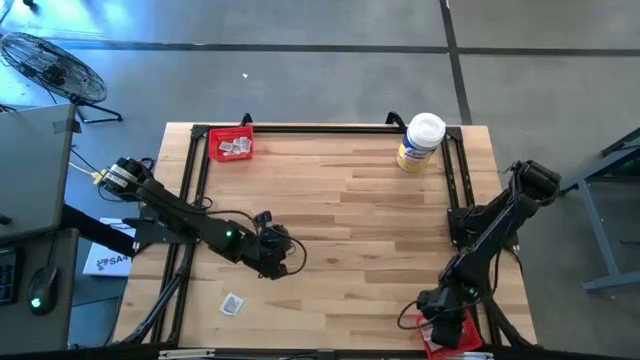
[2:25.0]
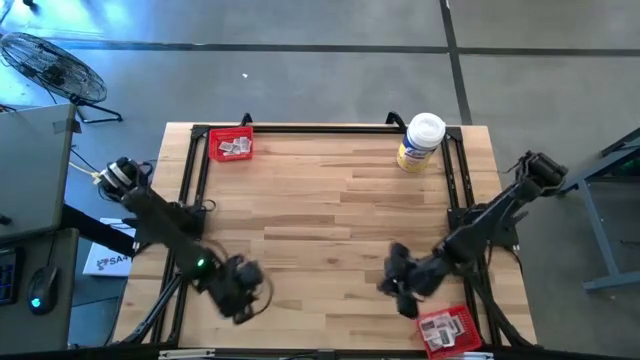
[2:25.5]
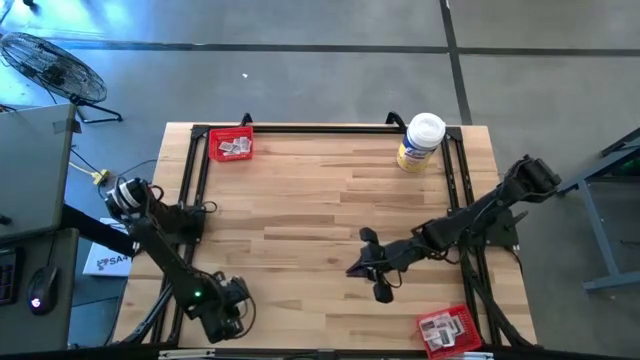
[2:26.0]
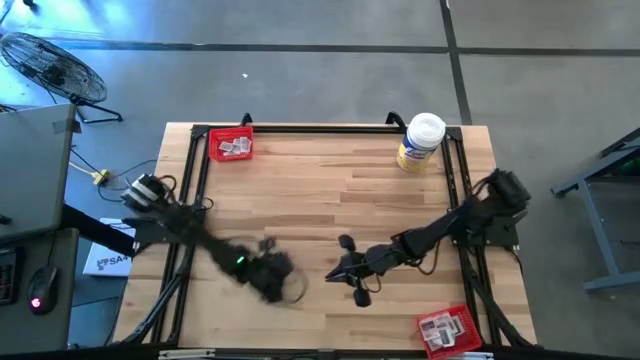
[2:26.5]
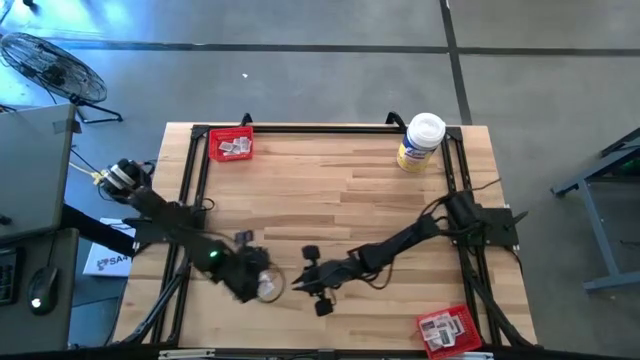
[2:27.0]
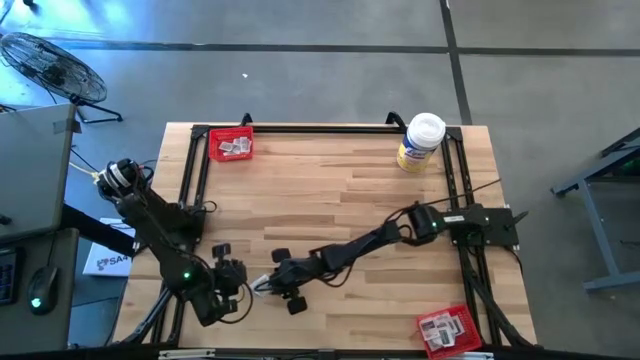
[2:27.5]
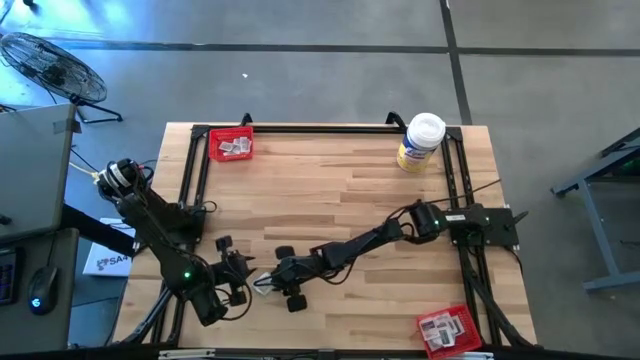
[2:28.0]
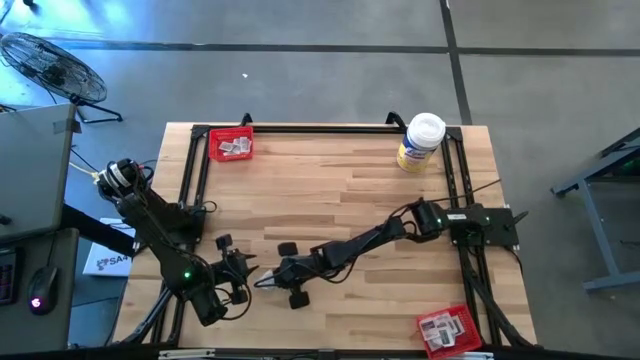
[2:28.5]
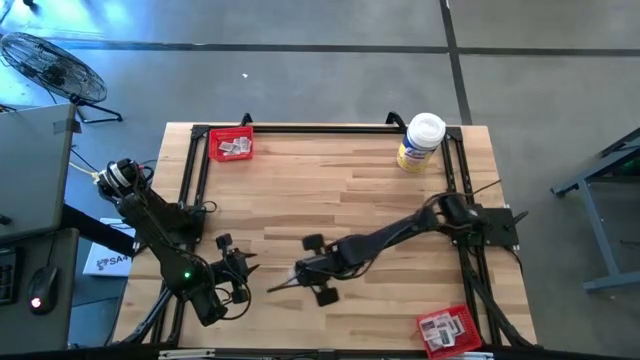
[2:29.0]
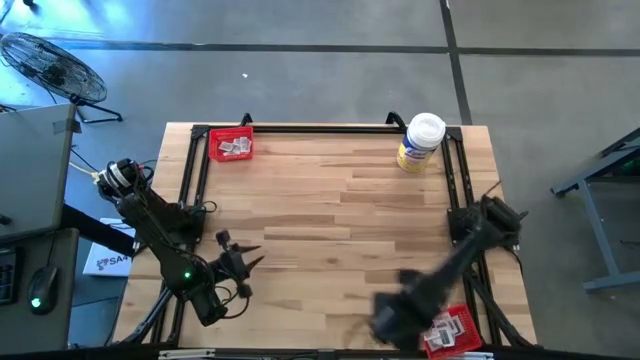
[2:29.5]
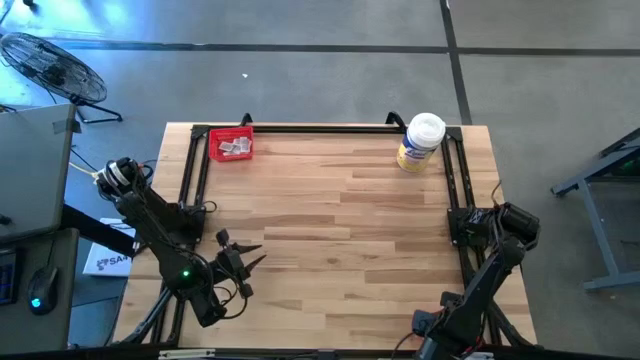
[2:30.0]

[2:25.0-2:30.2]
Task: Pick & Place First Aid Supplies
Put the white and gray towelette pack into the bottom red bin

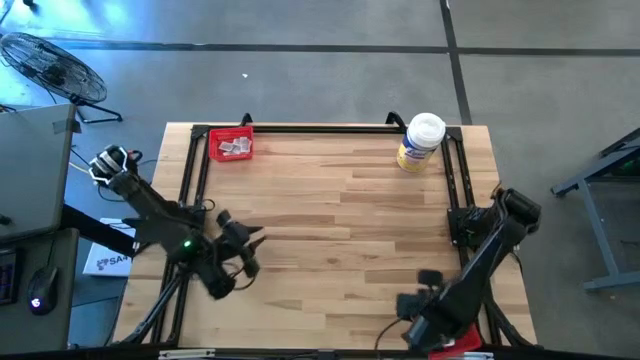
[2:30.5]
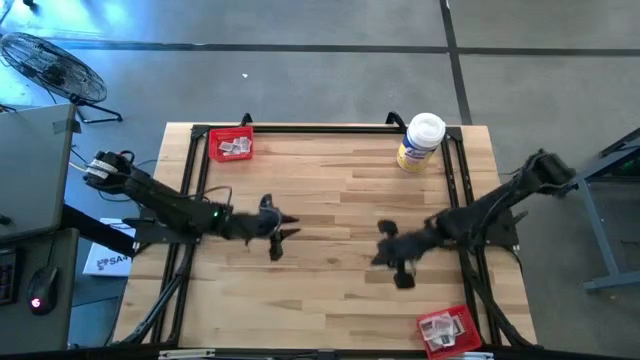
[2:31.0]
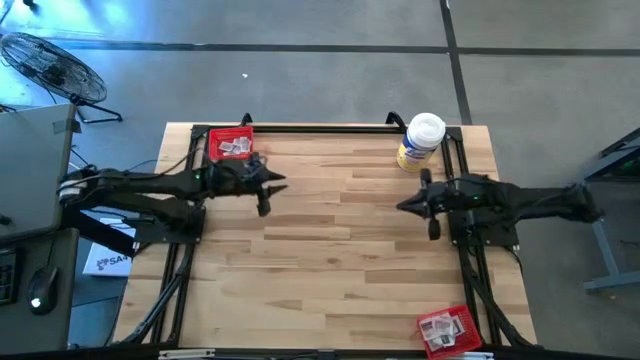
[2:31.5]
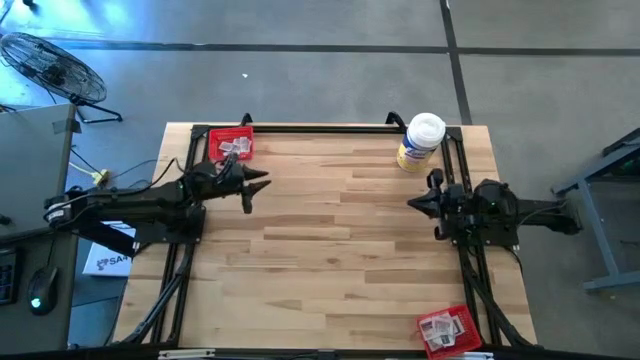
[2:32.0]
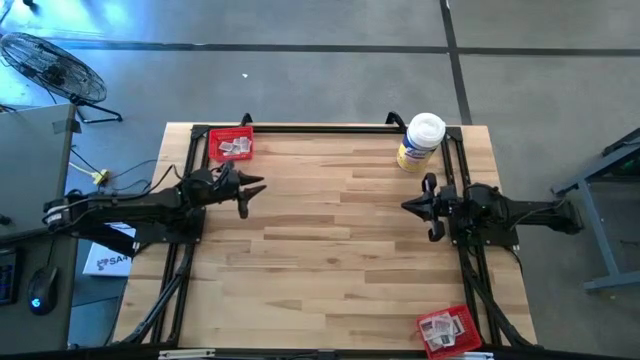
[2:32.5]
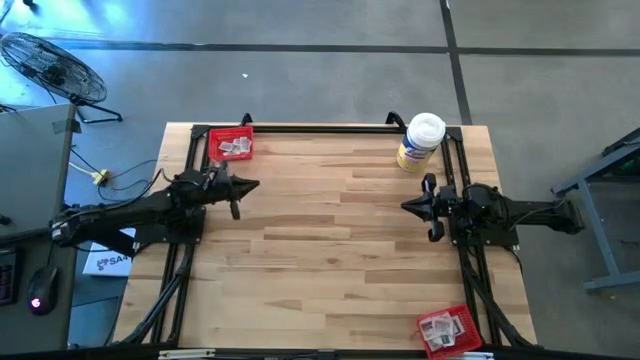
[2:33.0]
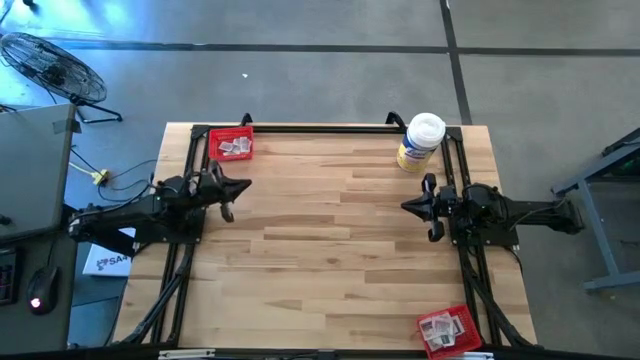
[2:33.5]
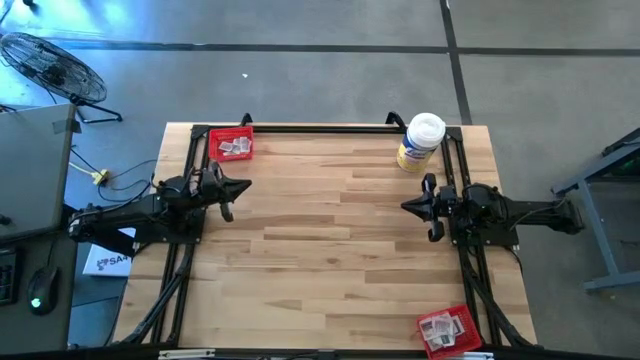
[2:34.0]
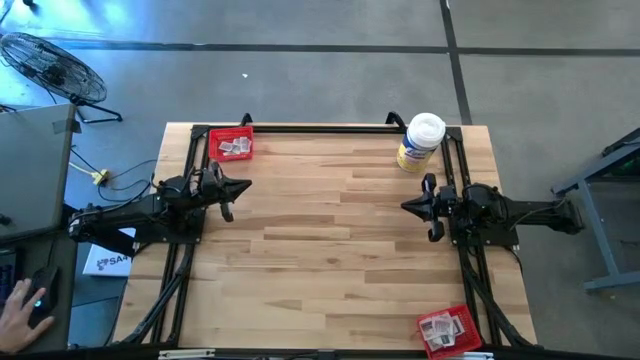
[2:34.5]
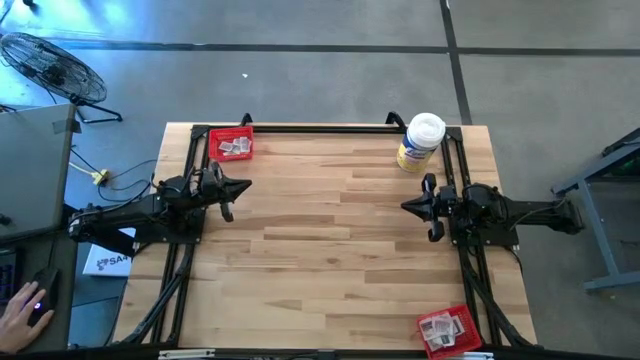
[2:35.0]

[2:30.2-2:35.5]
Return to Home Position

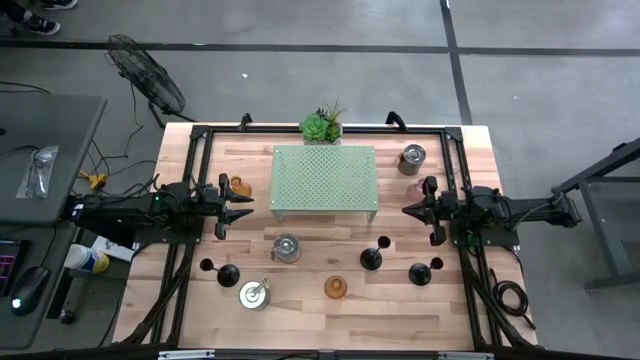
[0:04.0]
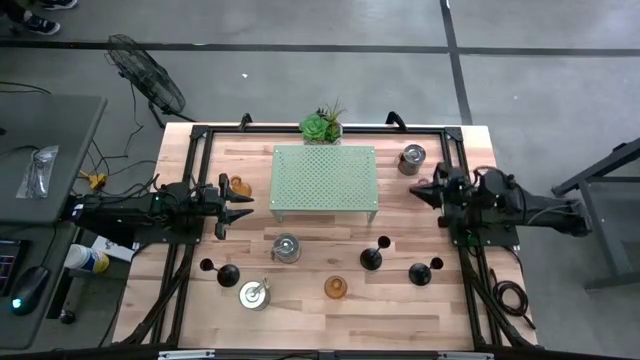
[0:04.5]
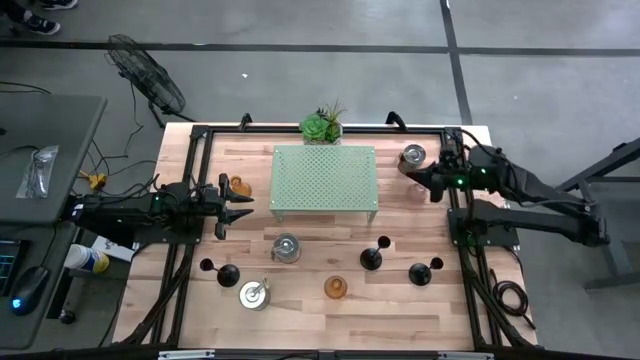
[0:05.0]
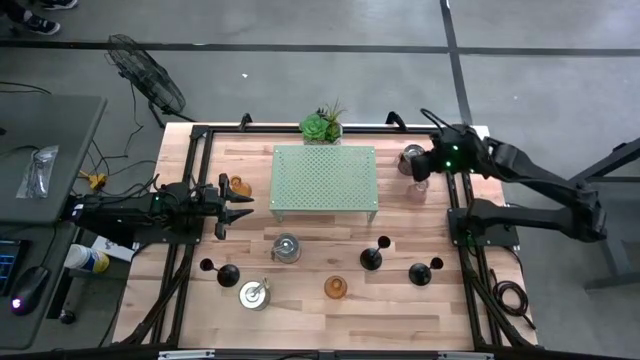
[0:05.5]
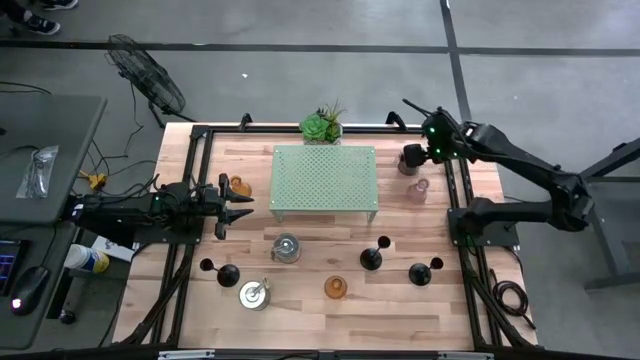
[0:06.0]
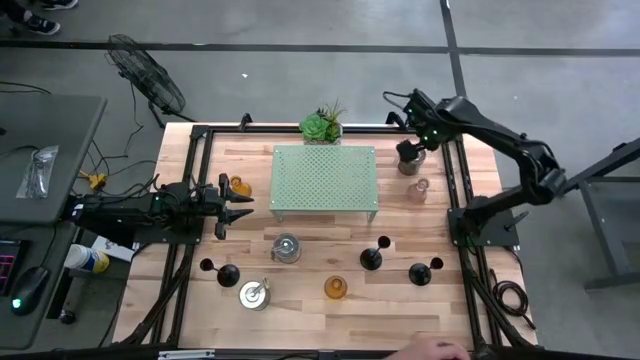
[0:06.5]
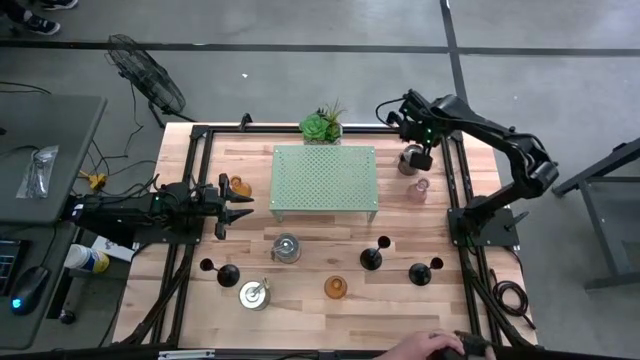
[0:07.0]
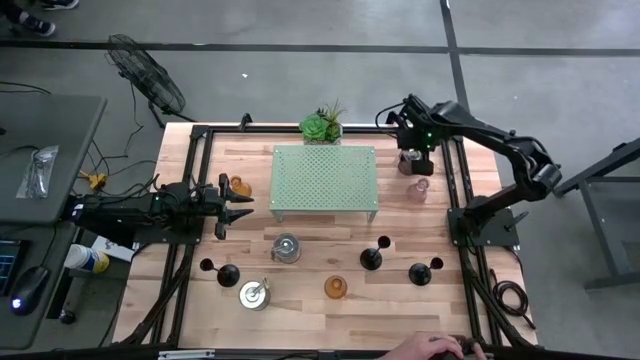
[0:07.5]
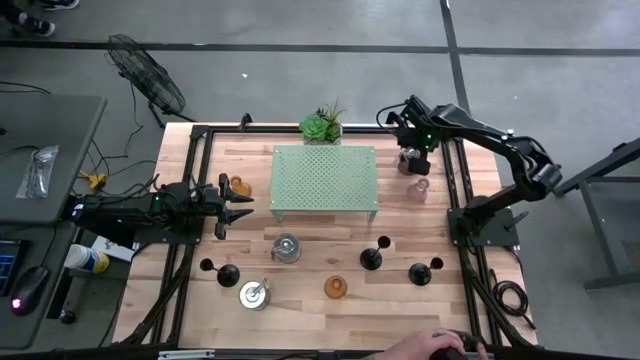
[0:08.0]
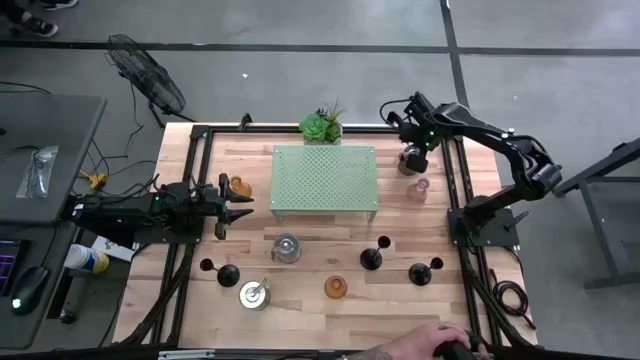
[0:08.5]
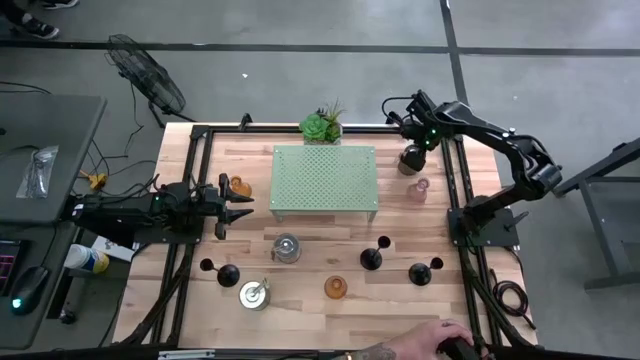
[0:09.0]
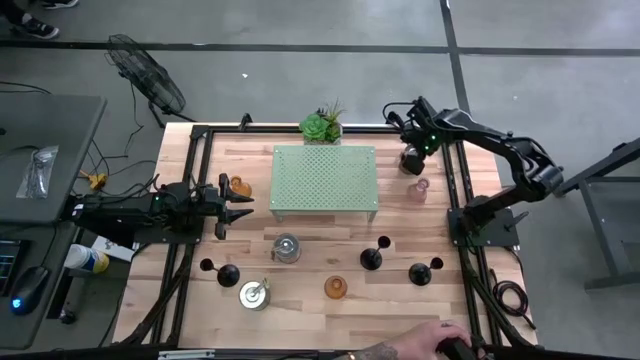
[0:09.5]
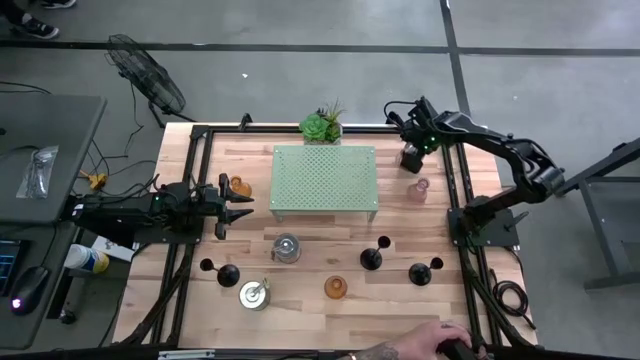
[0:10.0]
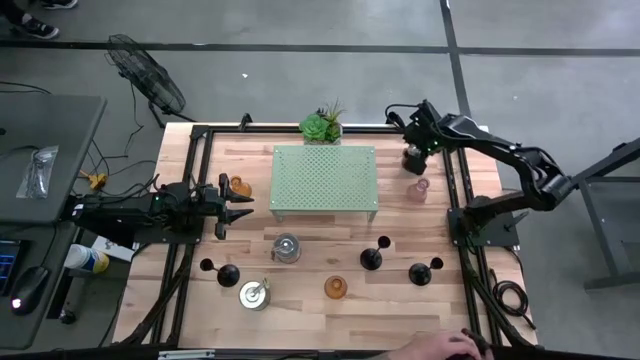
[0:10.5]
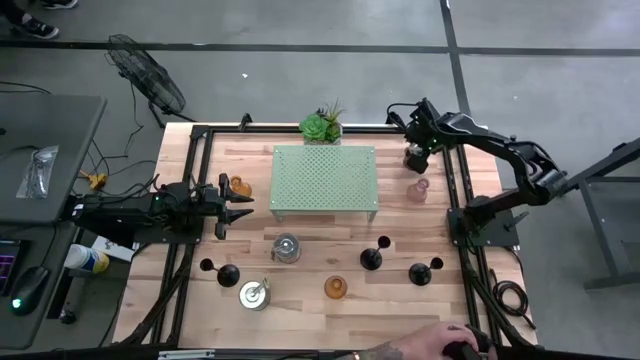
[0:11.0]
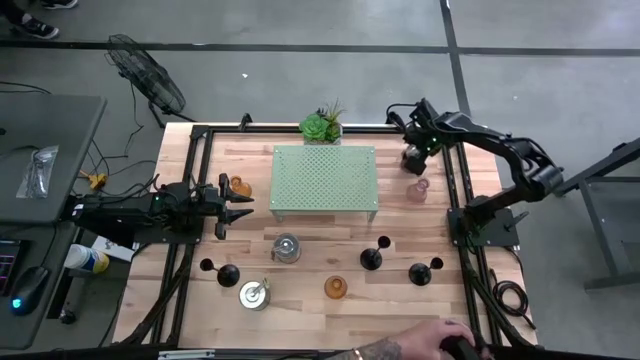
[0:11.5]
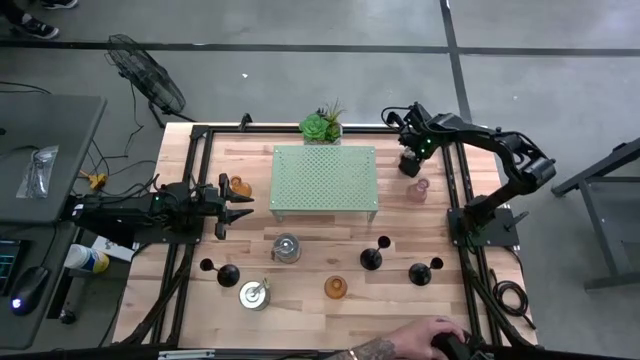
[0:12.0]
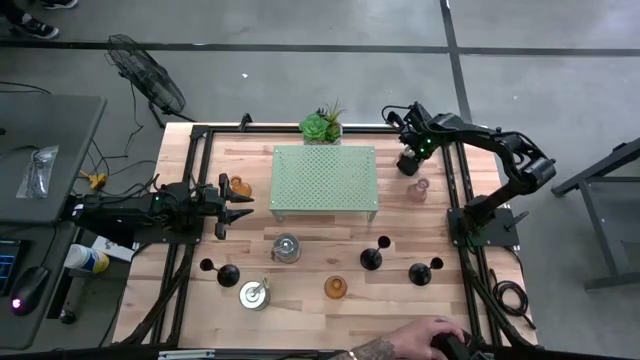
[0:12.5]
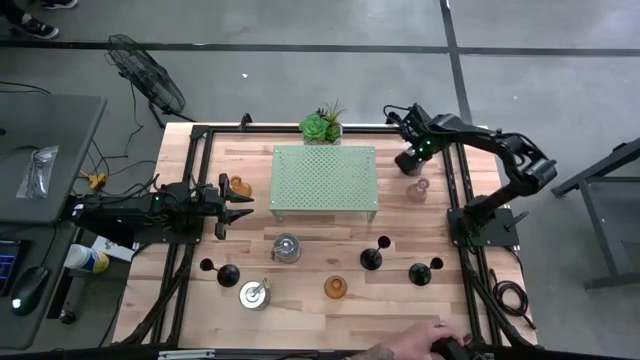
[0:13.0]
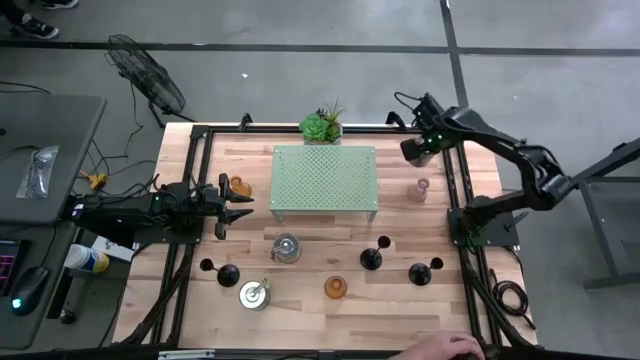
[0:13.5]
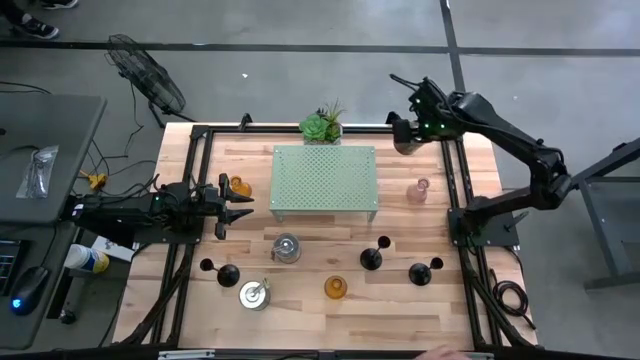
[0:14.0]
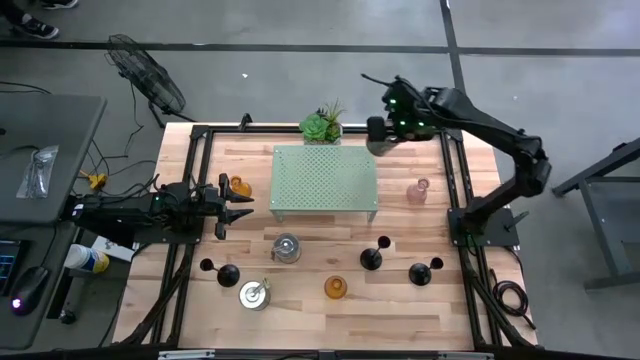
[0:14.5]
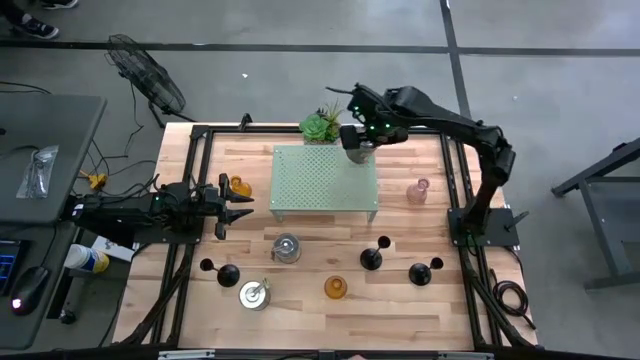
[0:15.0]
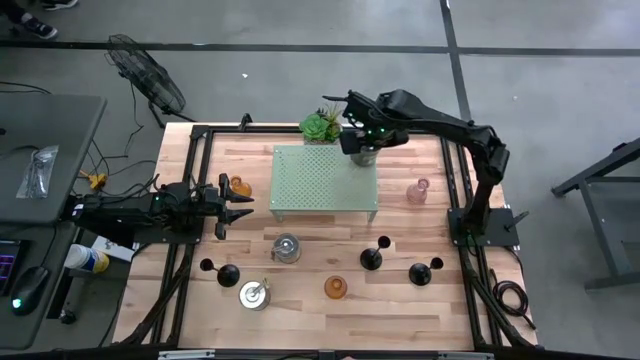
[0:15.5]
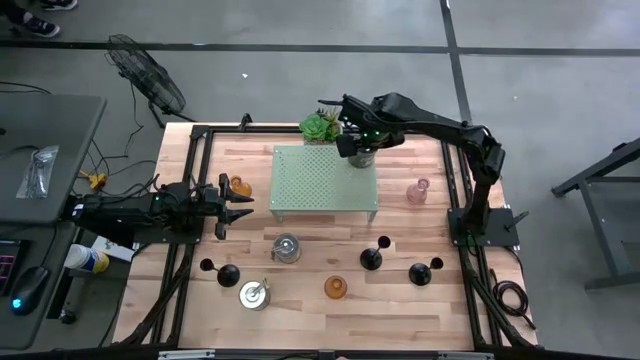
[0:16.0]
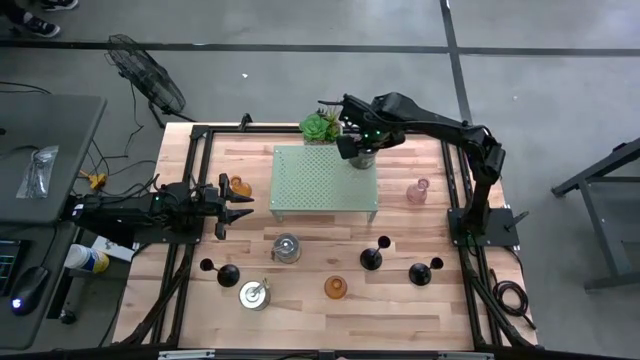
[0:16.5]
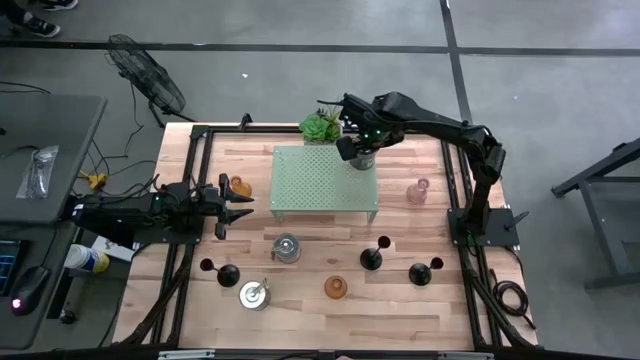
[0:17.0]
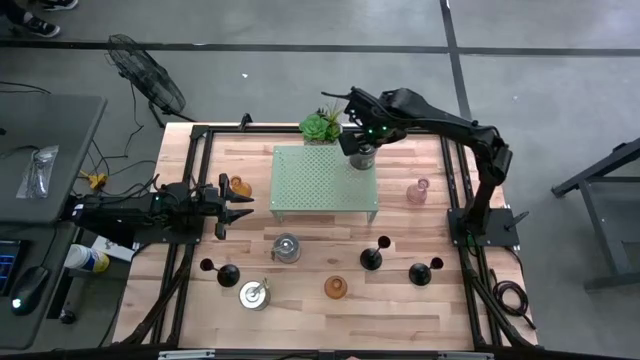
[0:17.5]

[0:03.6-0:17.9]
Task: Pick & Place candle stick holders
Put the top silver scented candle on the shelf
